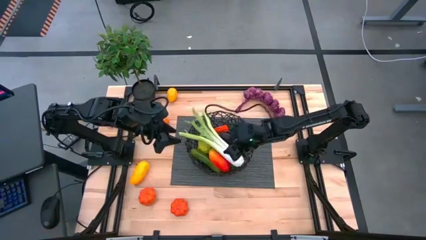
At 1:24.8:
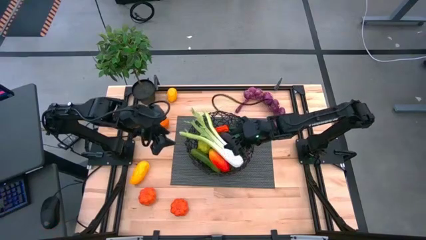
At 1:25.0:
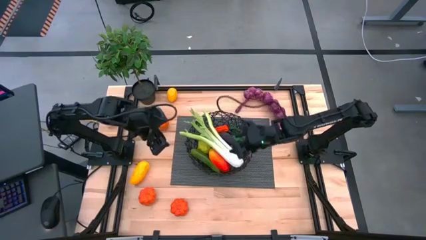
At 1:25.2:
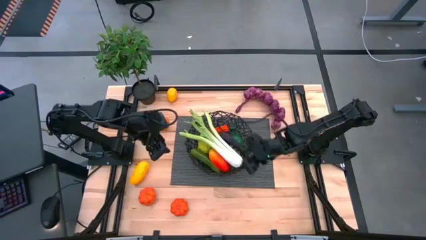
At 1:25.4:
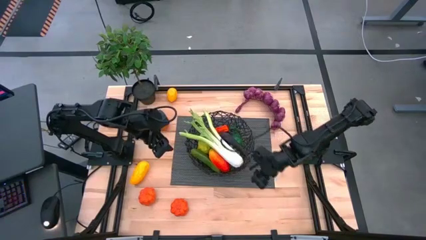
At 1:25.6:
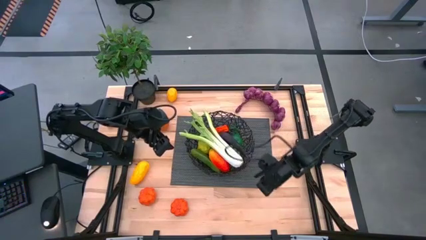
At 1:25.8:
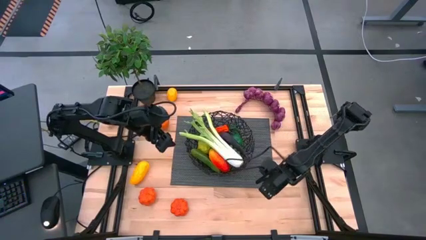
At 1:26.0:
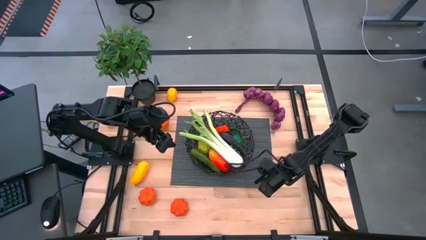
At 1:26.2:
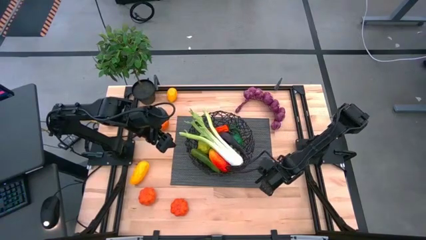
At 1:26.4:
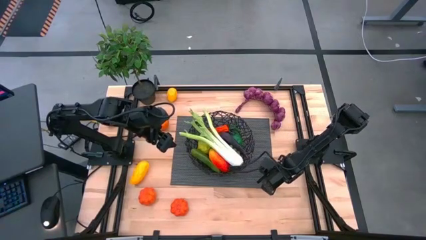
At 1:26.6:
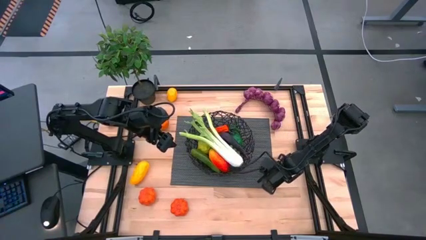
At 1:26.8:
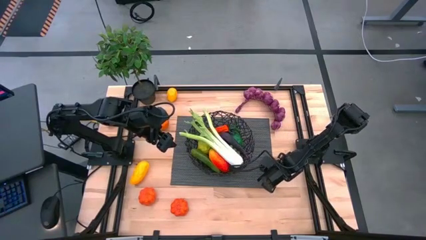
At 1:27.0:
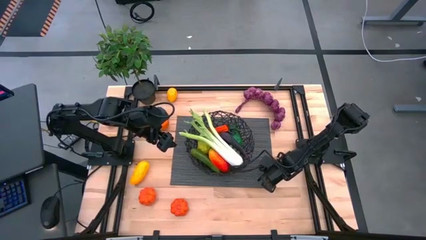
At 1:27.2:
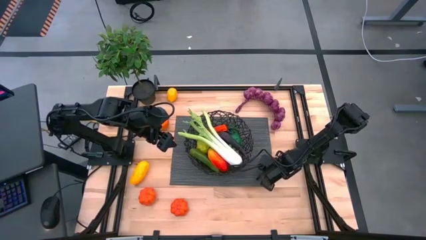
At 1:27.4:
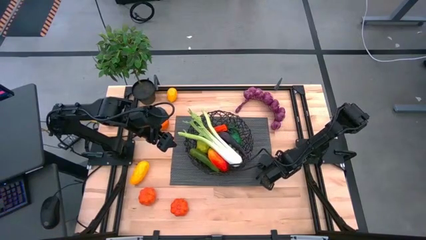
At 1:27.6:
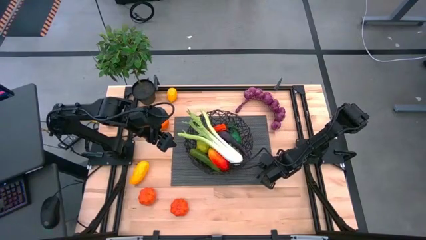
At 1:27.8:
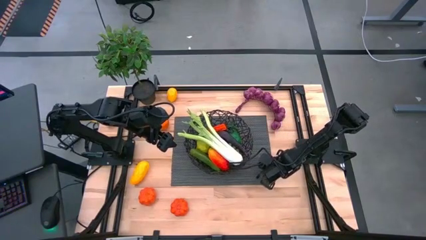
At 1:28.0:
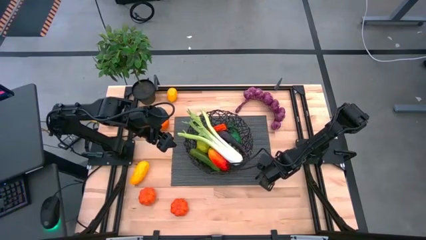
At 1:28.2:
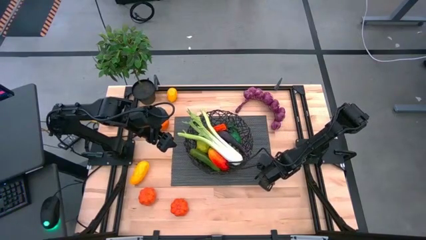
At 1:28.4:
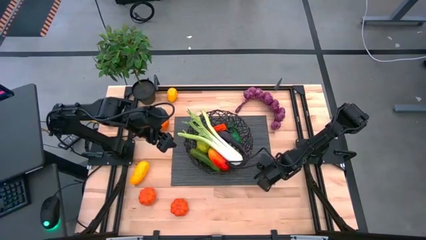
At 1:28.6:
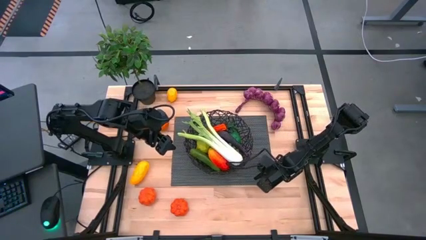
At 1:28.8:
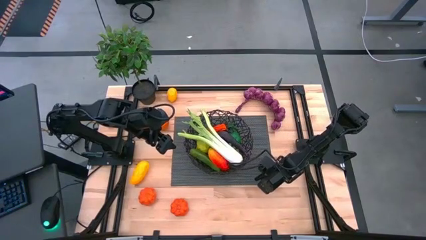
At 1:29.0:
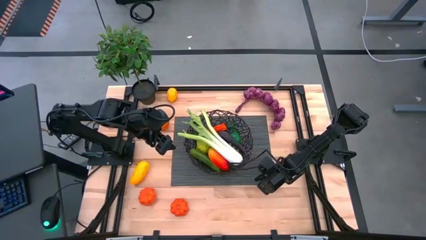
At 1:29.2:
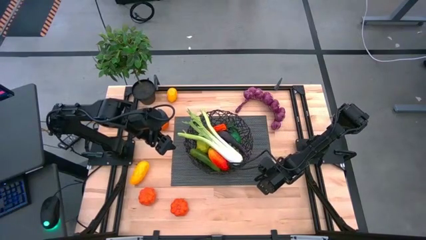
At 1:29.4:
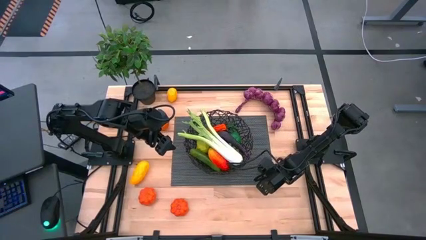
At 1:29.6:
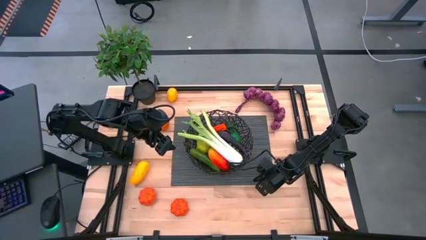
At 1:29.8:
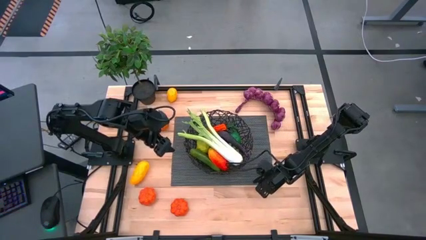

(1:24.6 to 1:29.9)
Task: Build produce basket
Adjust the black mat

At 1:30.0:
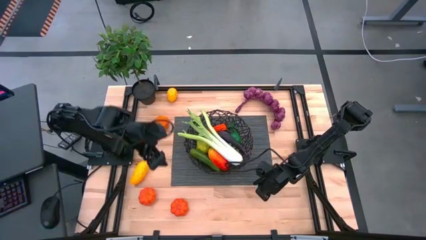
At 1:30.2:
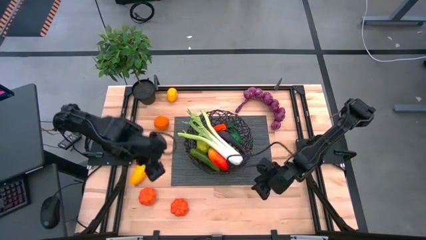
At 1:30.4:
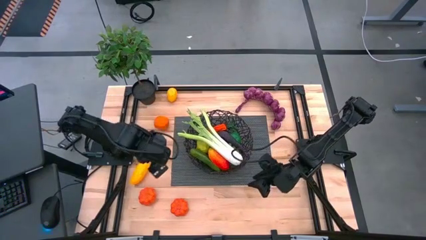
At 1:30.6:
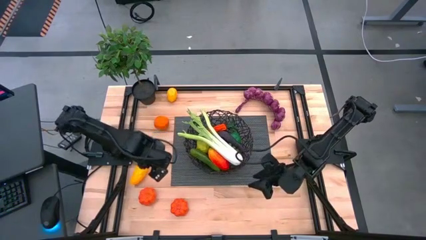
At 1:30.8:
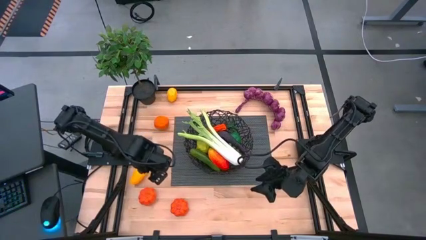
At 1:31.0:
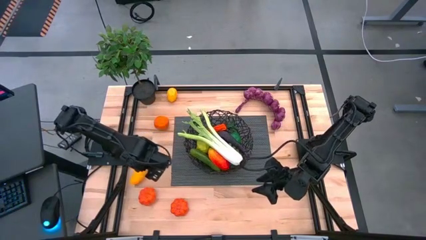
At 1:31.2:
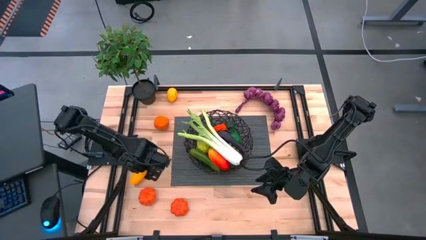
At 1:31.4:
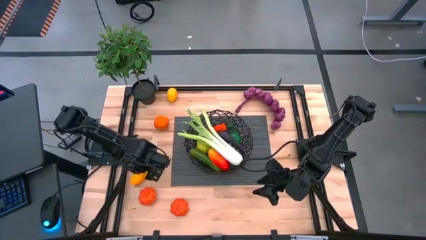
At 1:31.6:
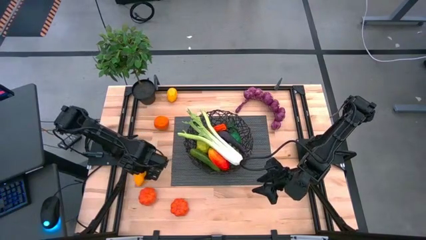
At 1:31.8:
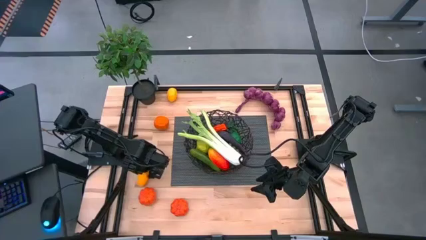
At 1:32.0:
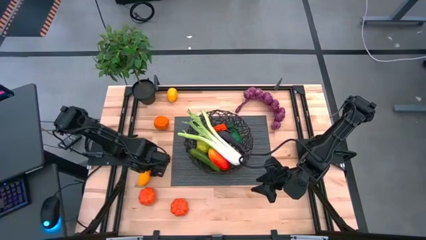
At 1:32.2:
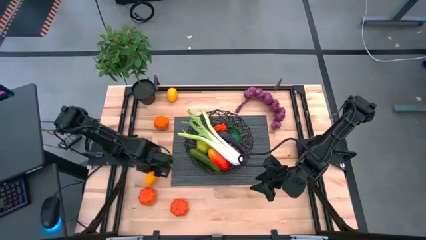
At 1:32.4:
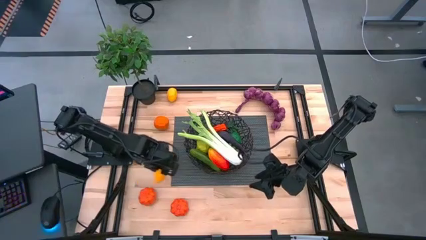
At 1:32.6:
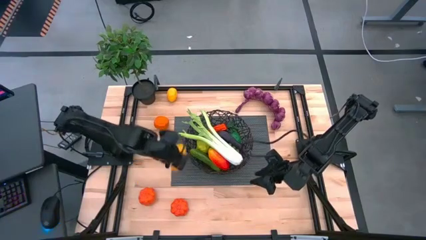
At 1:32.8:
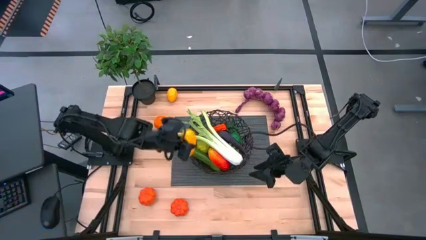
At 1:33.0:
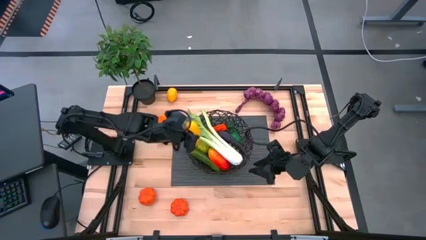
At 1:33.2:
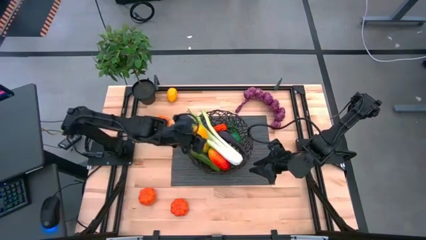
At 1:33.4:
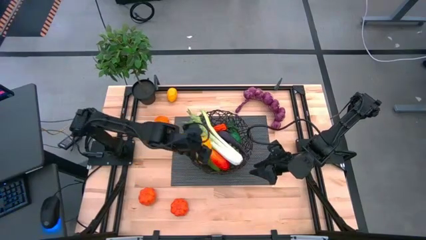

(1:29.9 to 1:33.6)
Put the yellow mango into the black basket

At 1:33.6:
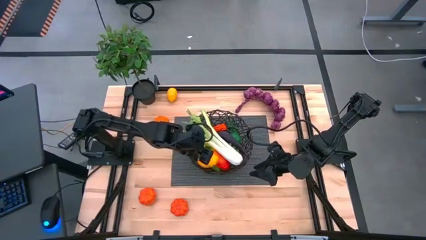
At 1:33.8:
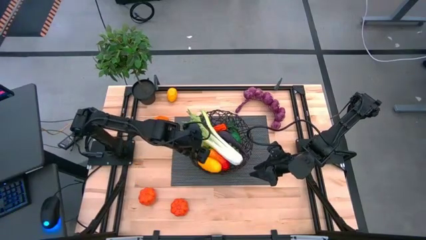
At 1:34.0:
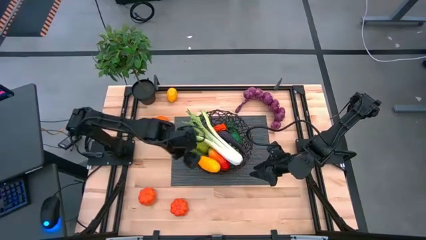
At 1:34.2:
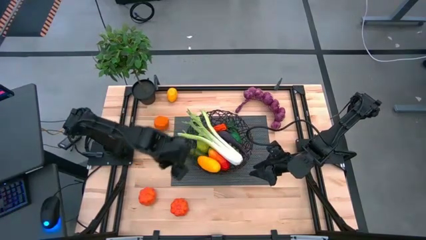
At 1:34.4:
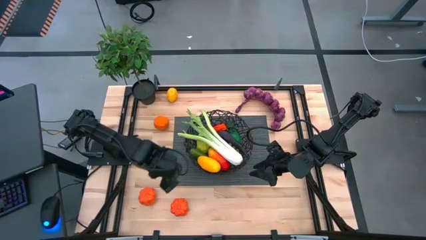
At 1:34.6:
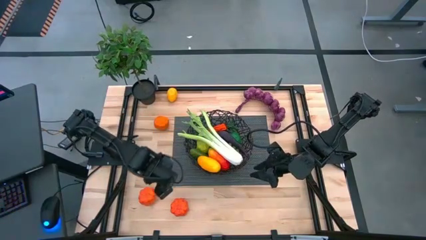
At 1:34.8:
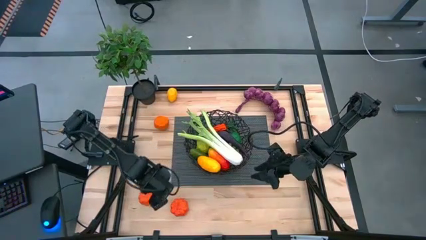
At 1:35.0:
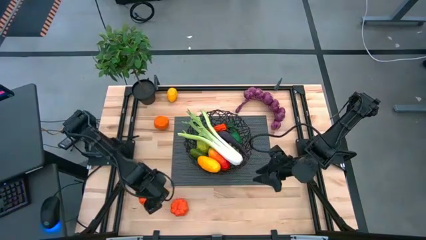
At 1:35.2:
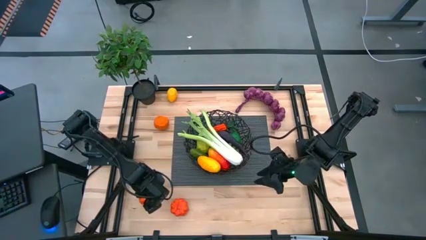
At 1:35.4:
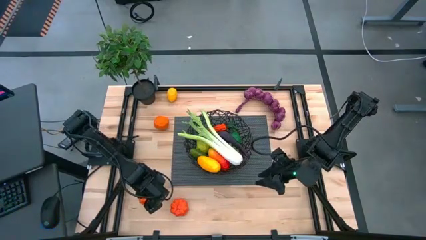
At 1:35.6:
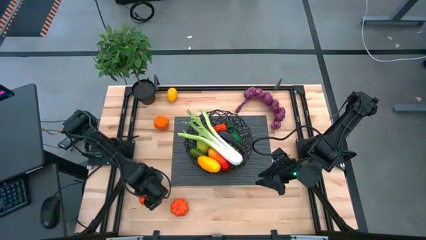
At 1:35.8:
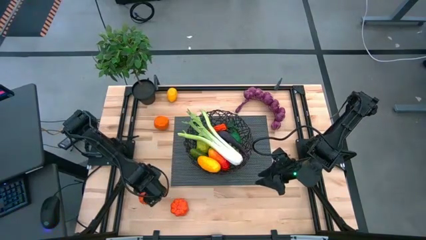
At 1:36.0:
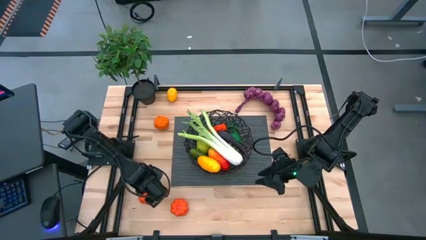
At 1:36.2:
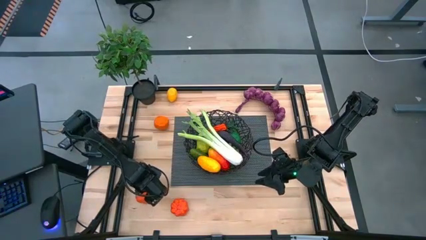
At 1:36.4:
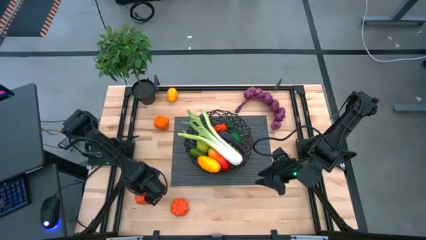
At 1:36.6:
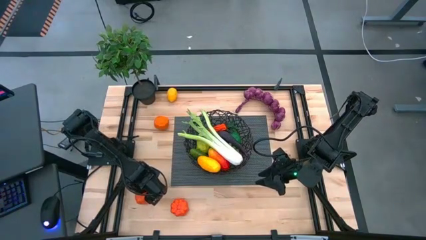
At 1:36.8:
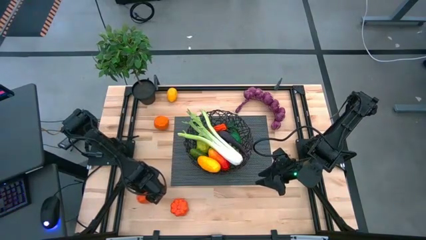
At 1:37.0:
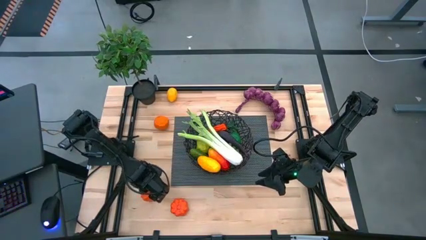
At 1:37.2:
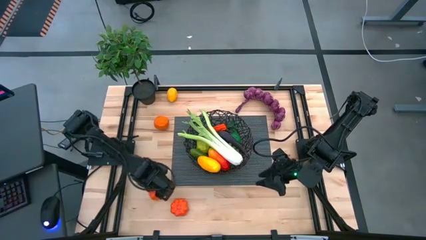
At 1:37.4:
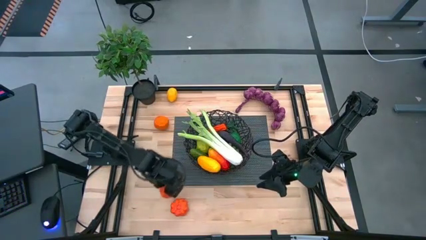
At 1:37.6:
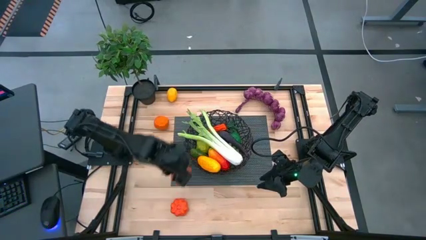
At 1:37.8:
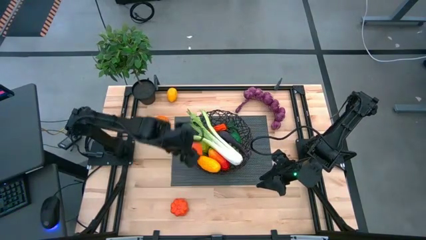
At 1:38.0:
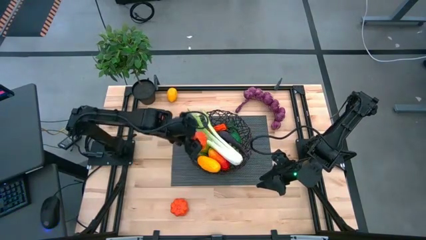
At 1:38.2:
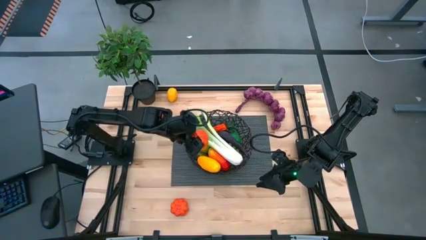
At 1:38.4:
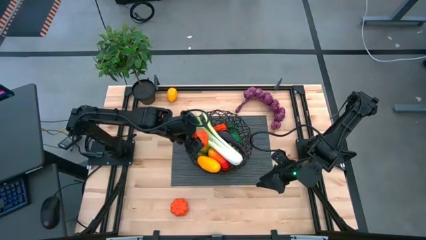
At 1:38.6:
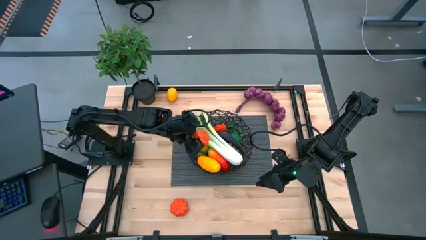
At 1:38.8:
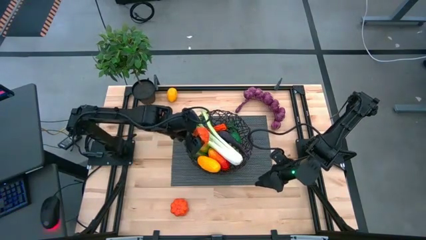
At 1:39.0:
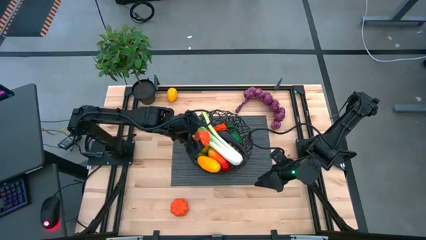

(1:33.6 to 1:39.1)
Put the left pumpkin into the black basket

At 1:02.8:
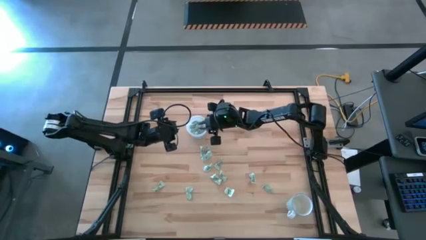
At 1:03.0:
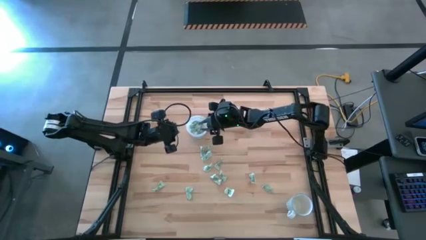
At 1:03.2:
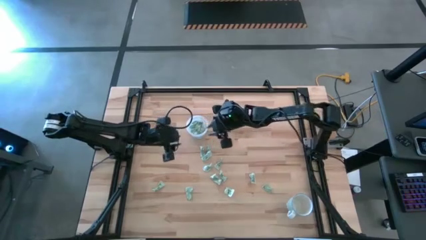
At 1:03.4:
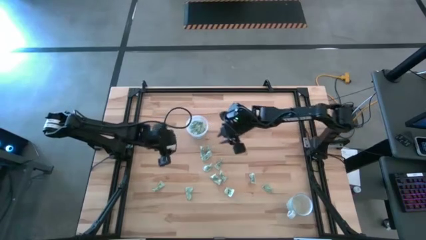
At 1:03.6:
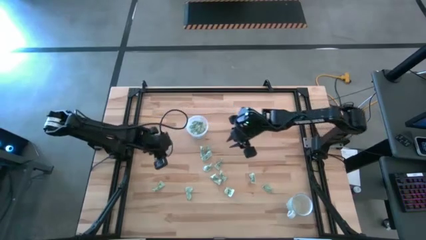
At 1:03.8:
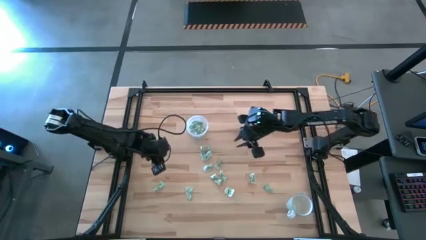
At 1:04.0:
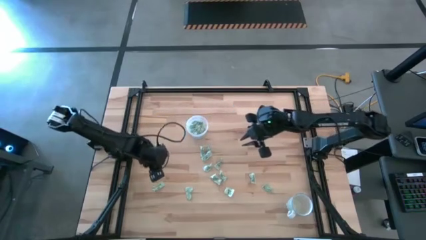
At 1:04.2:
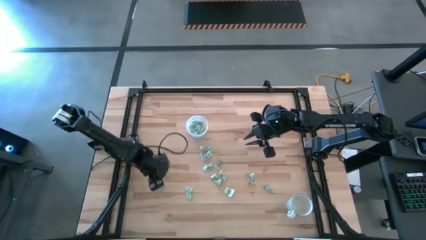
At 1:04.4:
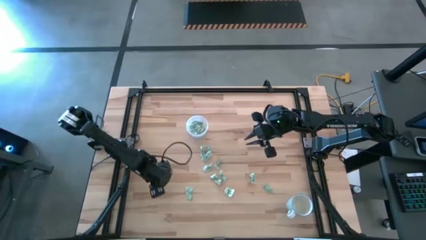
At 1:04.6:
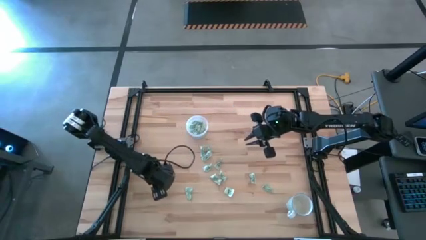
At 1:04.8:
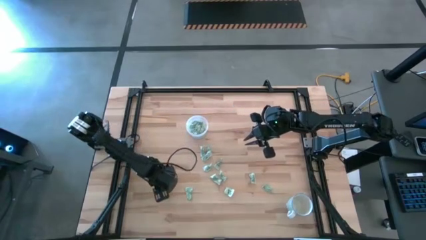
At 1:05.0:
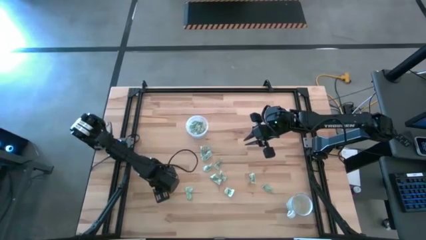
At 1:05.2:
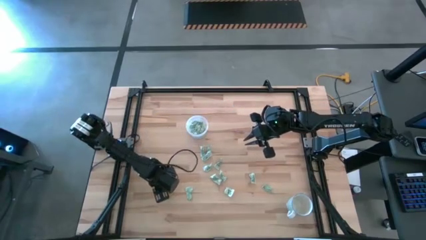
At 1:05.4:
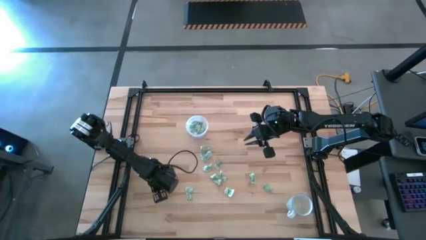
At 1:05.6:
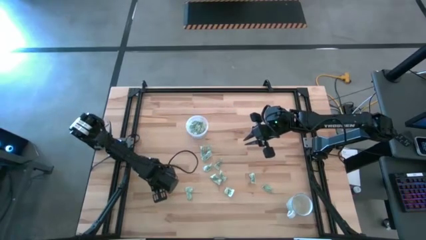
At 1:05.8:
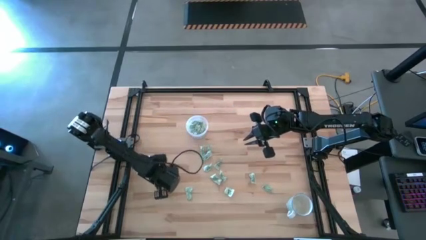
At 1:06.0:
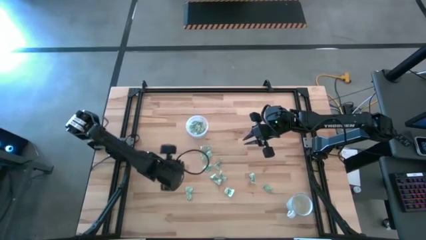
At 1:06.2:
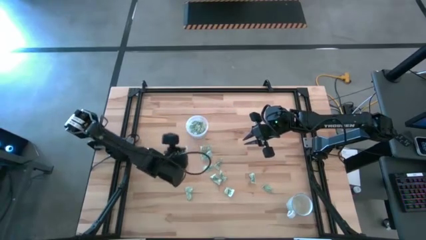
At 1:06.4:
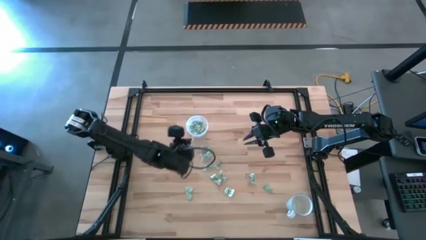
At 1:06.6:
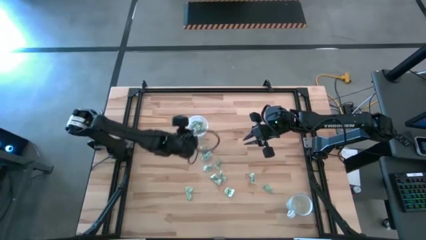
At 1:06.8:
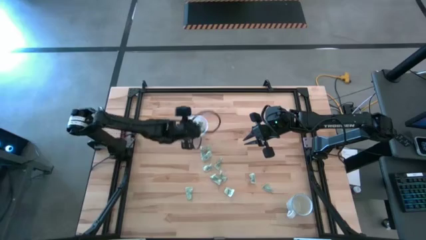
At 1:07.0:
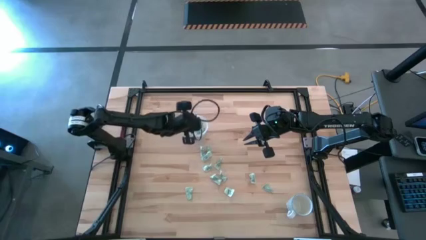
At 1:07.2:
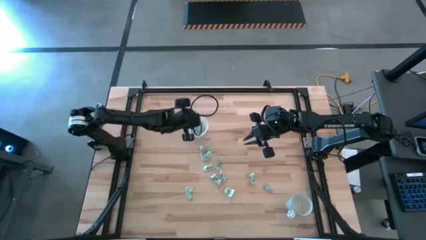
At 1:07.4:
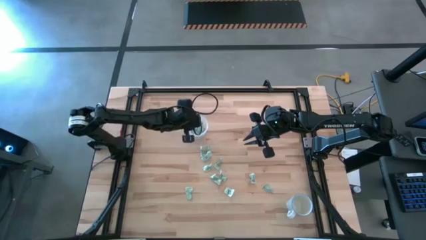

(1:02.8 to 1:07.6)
Task: Pick and place Stevia / Truvia into bins
Put the stevia packet into the transparent container
